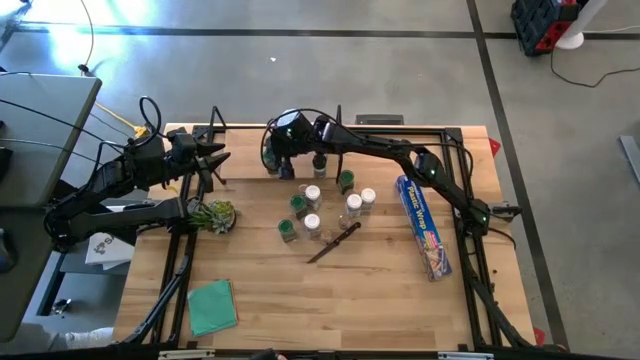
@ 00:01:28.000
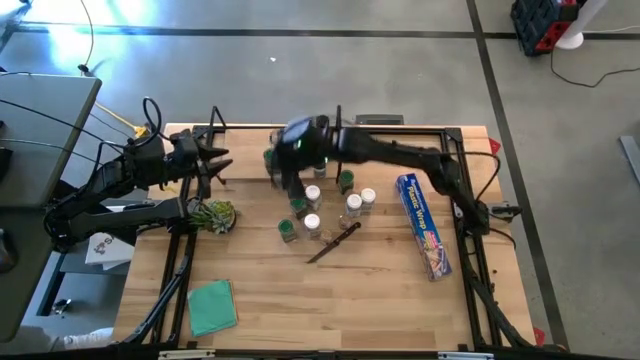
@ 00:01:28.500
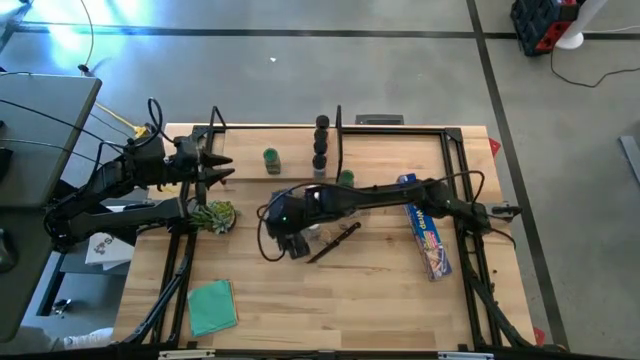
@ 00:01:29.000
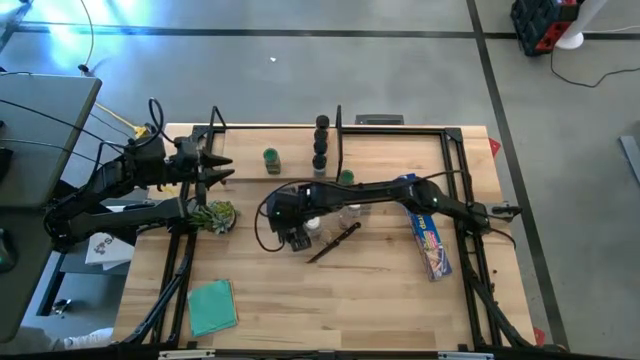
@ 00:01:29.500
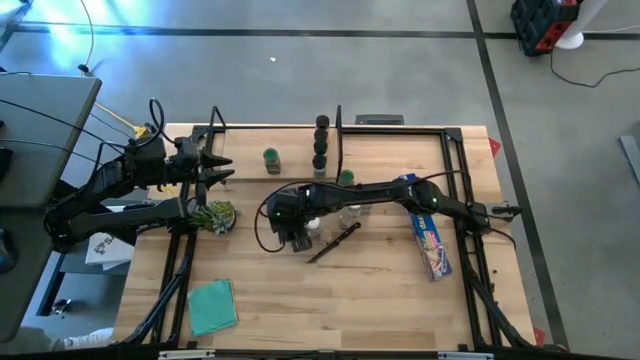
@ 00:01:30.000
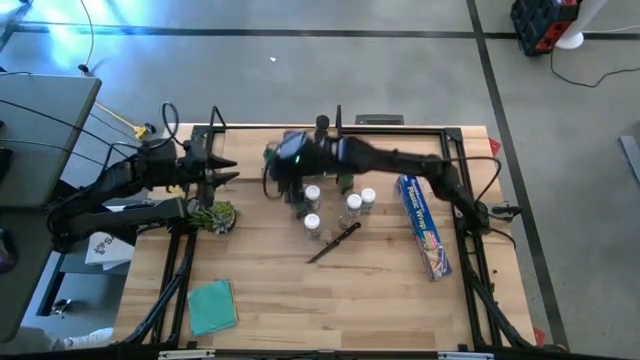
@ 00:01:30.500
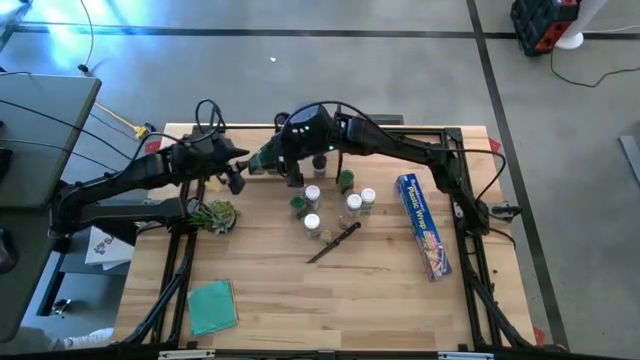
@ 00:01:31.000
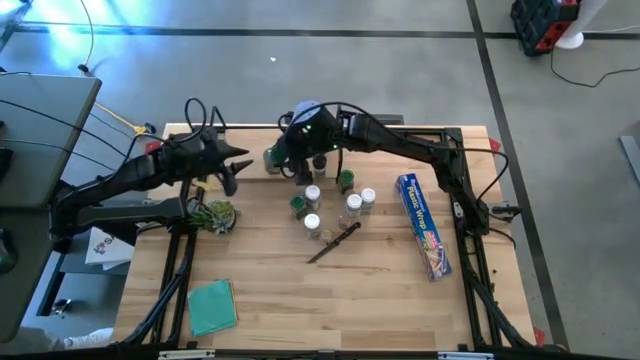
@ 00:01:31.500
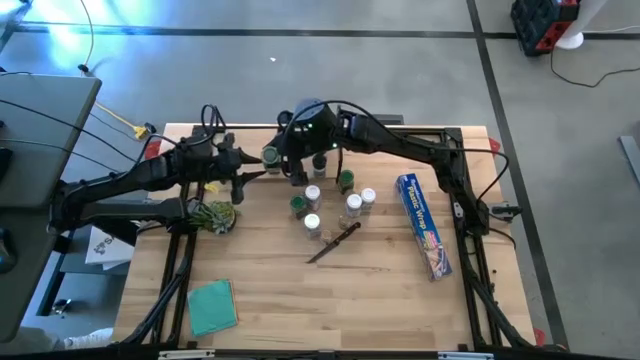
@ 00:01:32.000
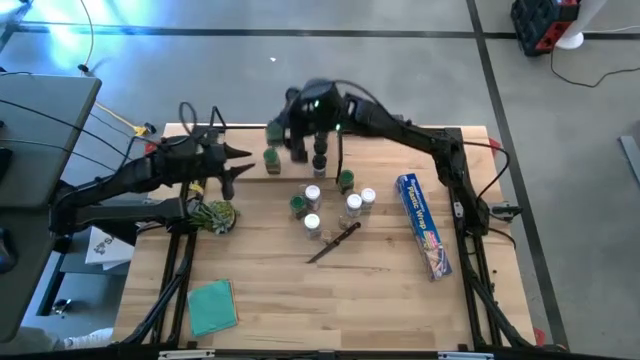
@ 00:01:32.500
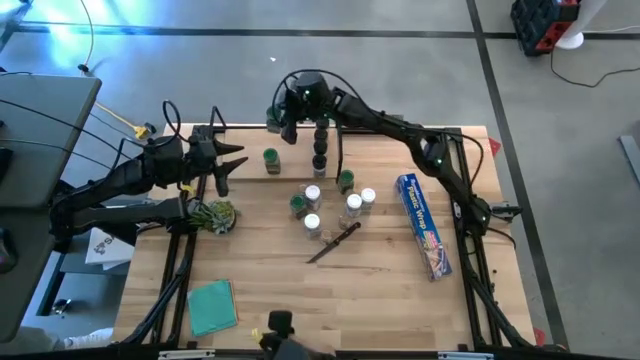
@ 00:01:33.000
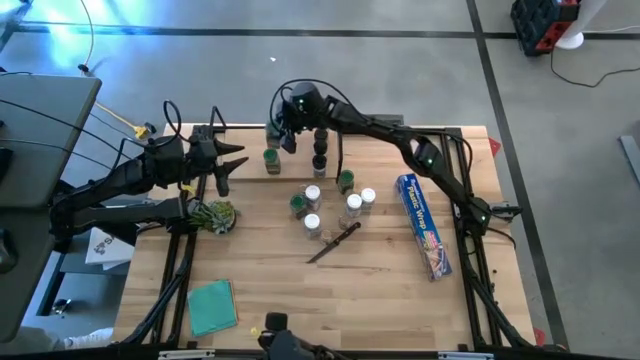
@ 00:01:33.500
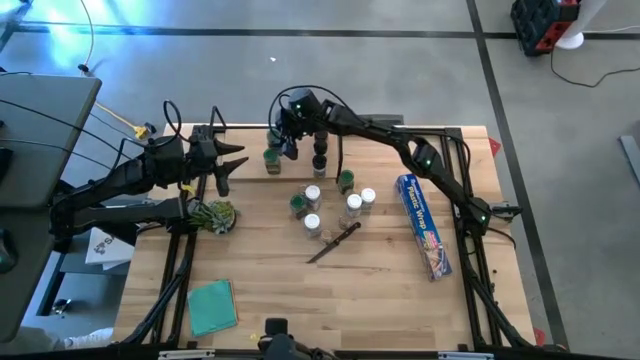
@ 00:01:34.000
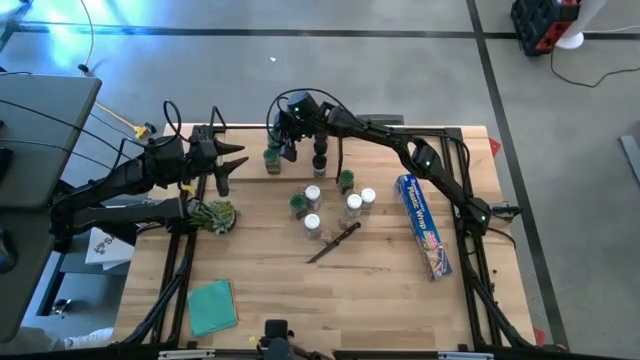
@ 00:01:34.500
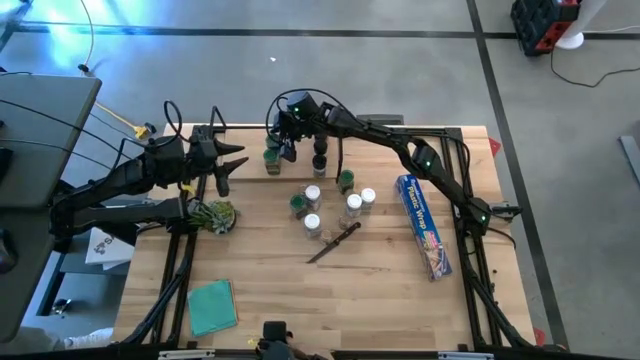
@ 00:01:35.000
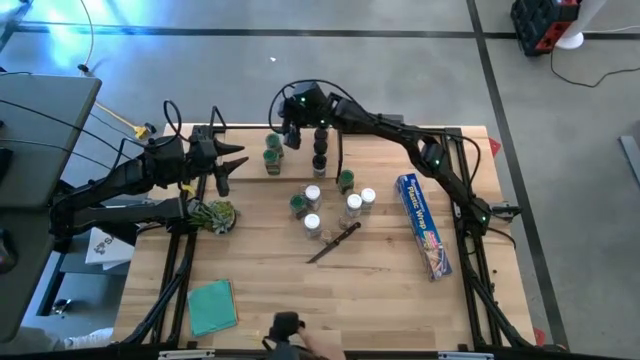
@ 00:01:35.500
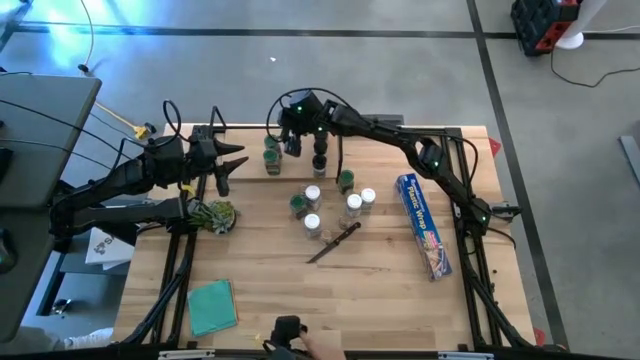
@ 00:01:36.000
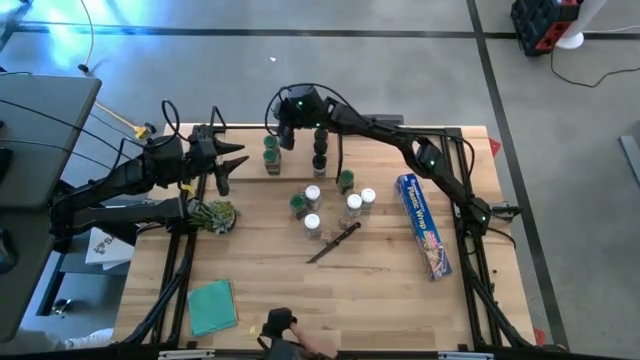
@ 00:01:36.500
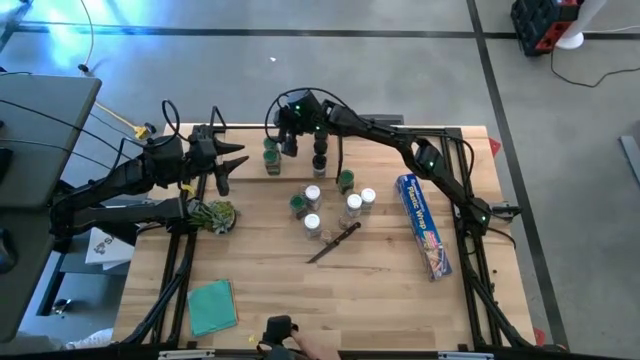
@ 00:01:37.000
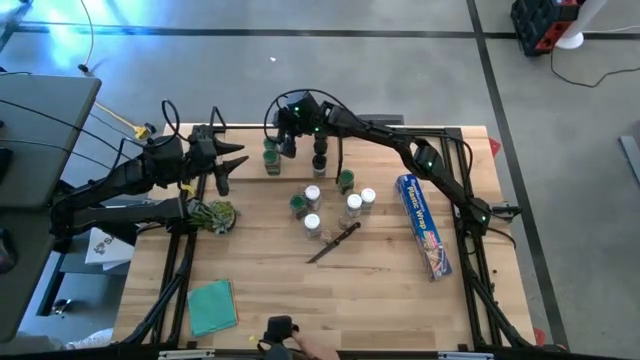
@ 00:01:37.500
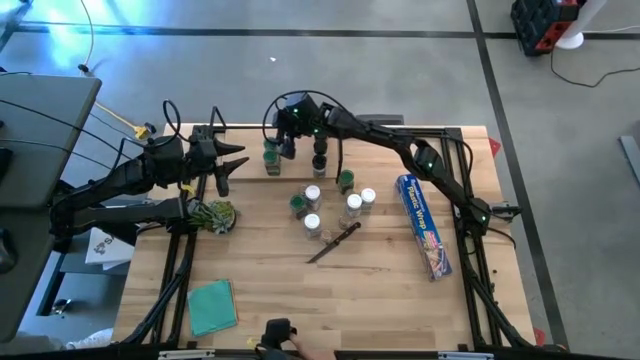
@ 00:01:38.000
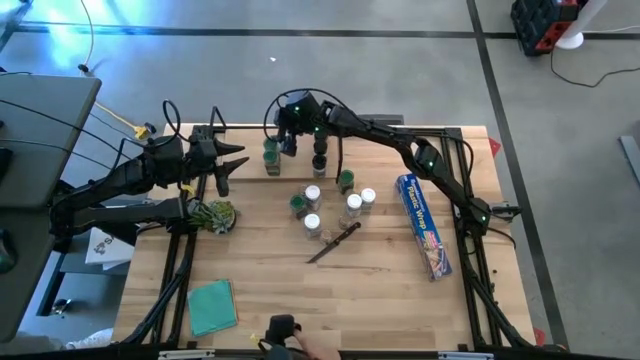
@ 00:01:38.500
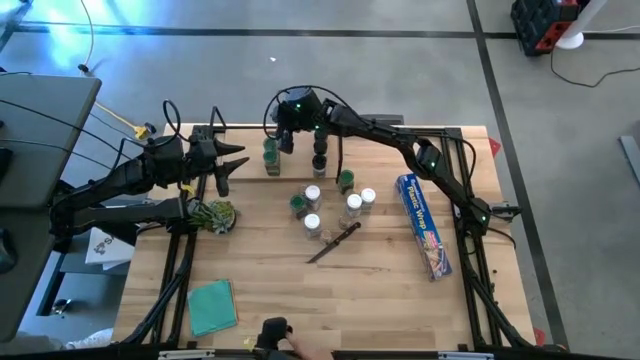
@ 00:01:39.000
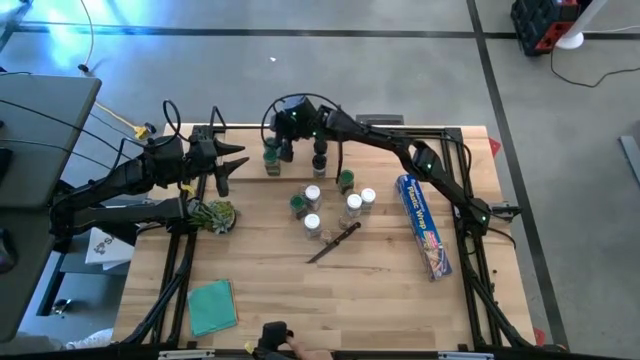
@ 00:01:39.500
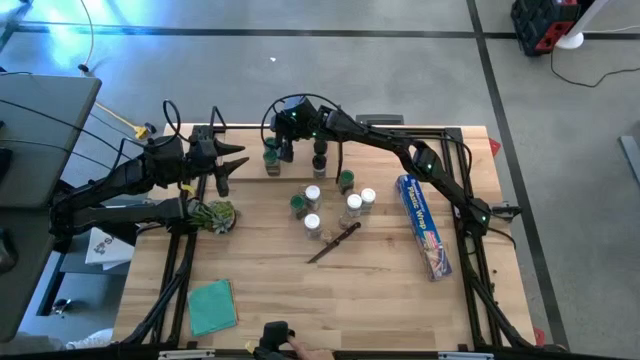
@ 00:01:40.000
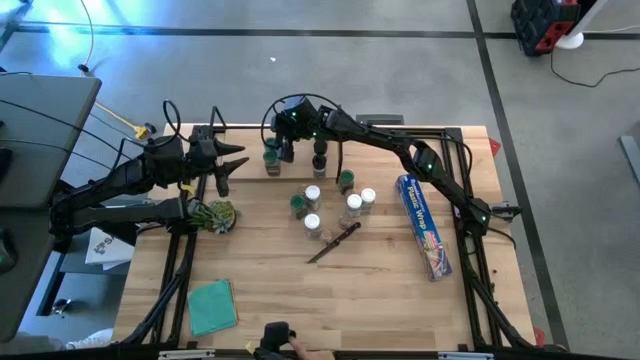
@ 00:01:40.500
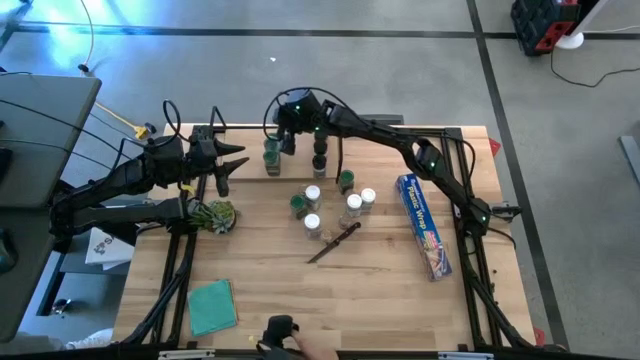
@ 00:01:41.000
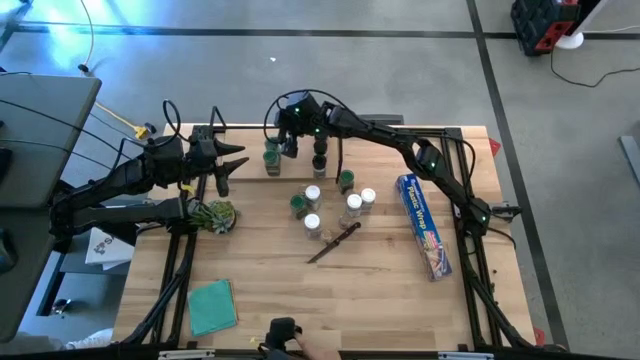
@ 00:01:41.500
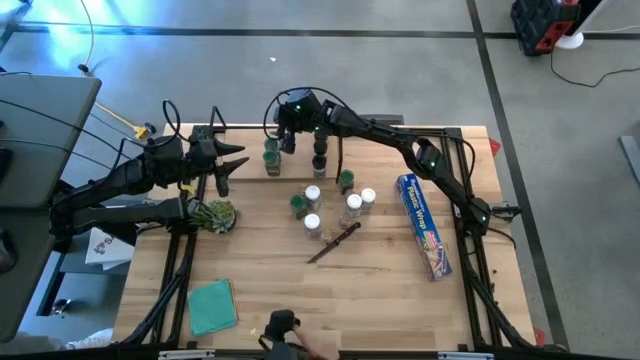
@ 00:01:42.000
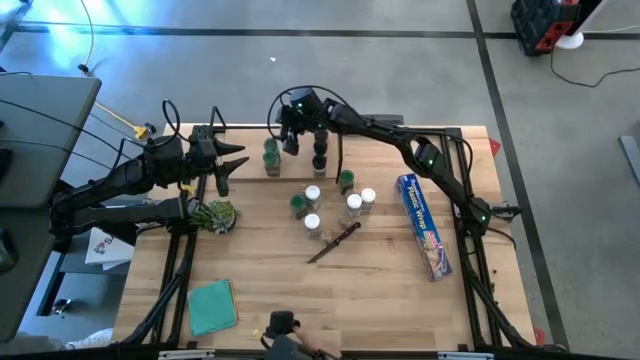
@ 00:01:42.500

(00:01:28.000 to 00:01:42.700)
Task: Shelf spices
Put the green lid seasoning bottle on the shelf

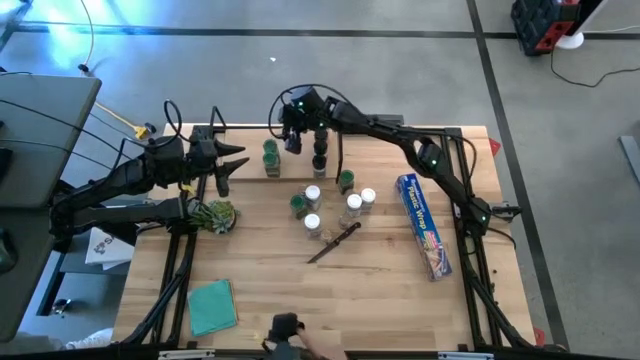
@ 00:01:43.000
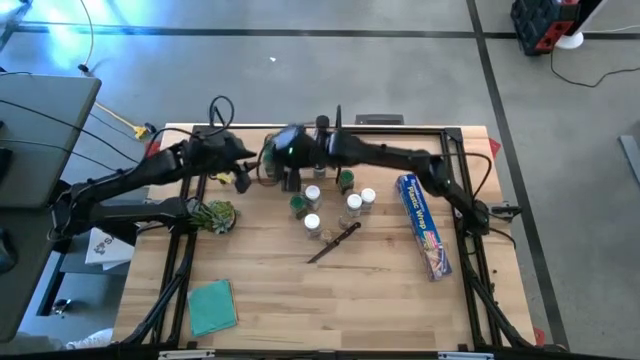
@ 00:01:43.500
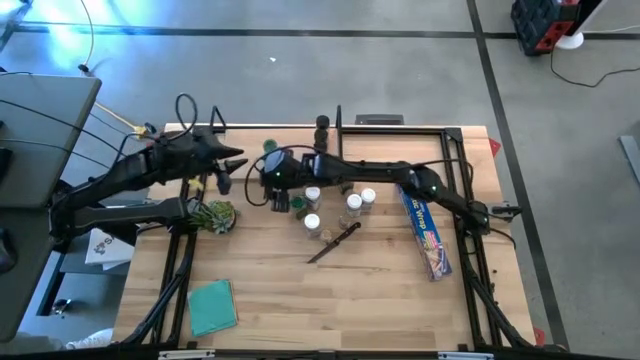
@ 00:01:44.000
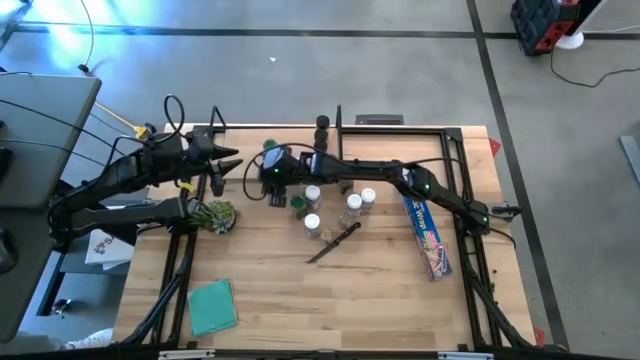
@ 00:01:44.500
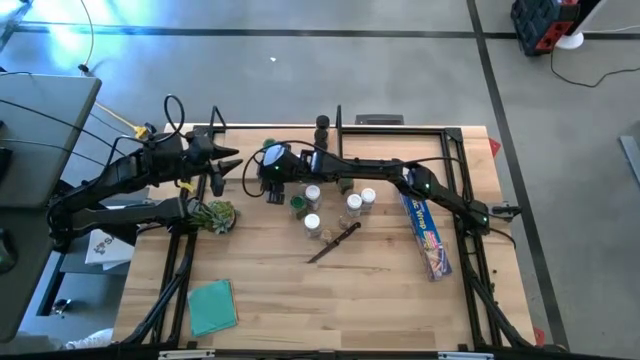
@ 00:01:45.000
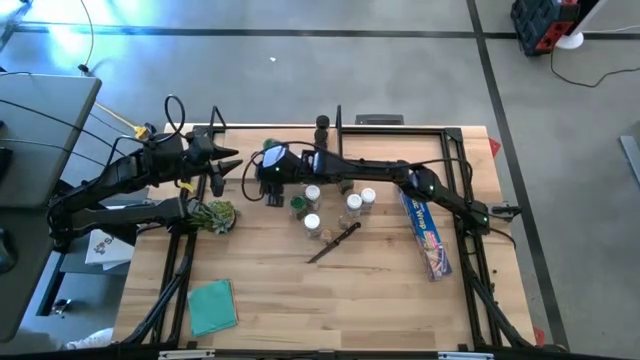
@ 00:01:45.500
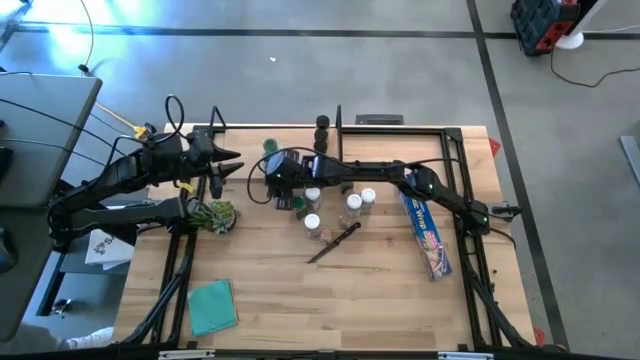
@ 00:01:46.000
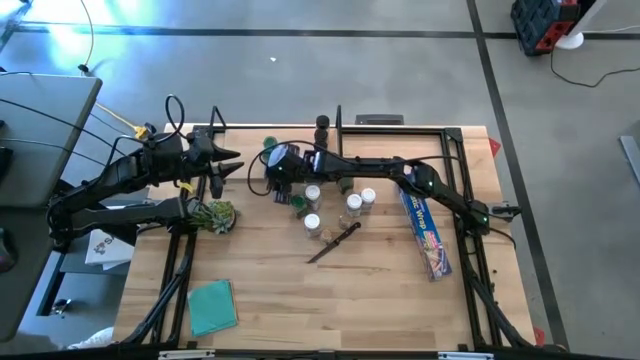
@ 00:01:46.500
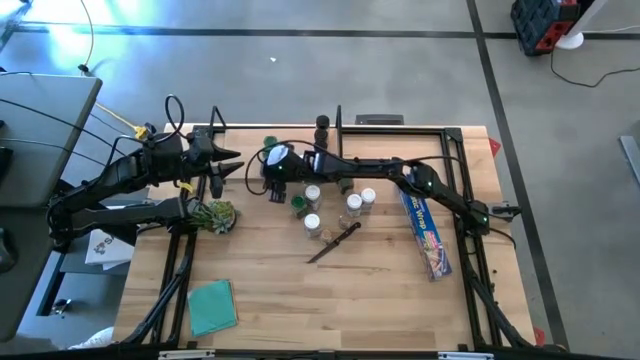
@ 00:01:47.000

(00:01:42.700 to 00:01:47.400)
Adjust the green lid seasoning bottles
